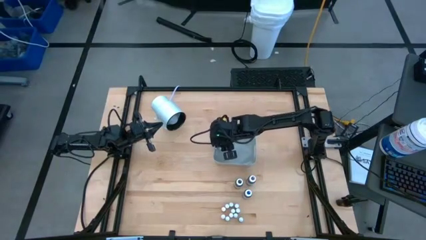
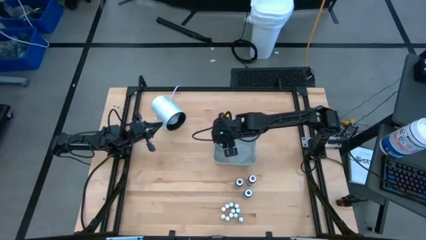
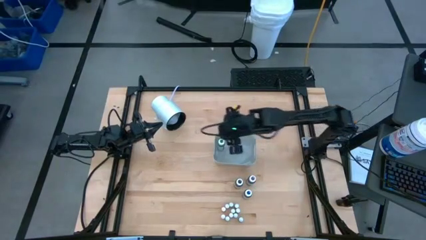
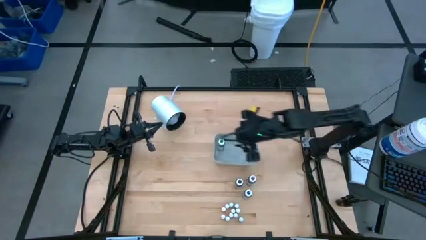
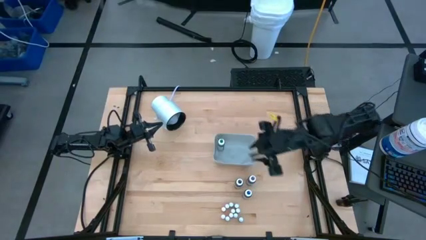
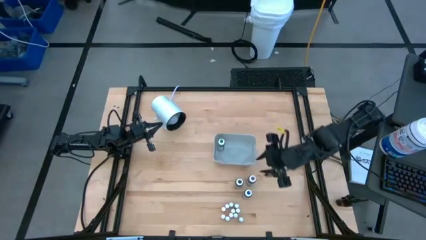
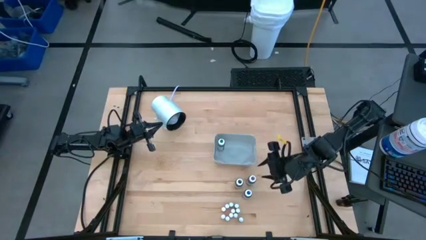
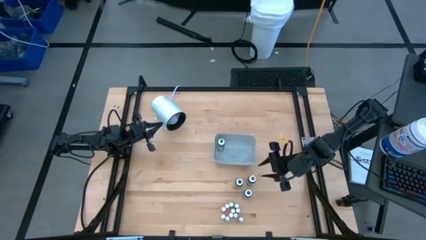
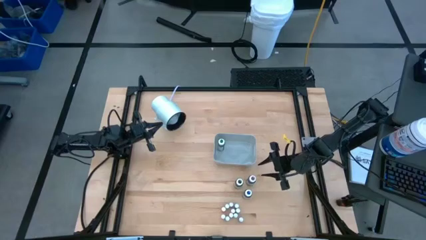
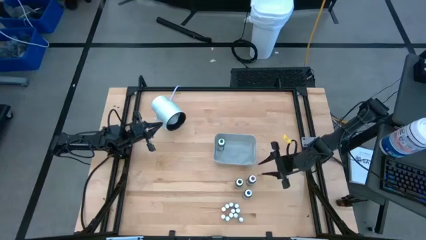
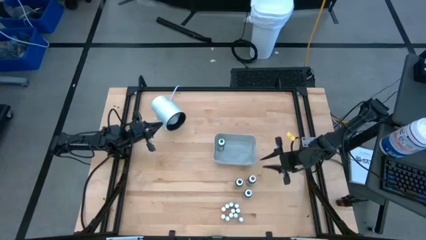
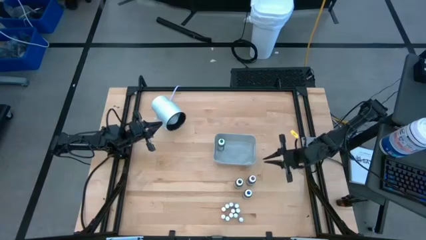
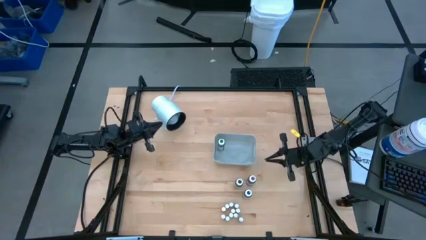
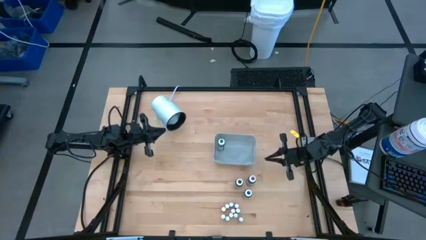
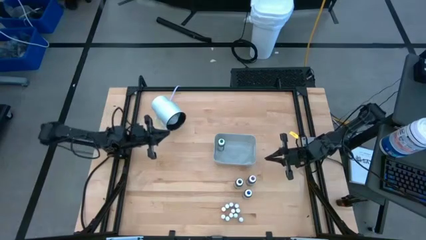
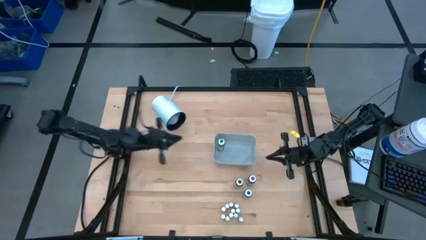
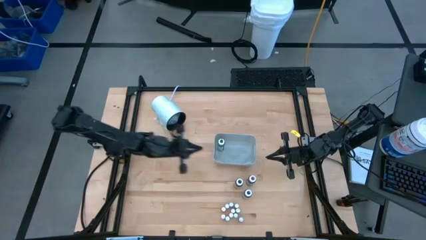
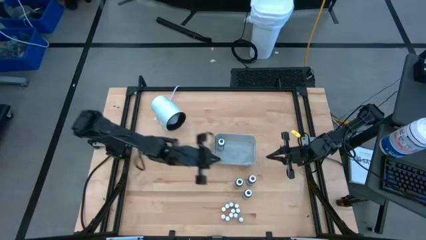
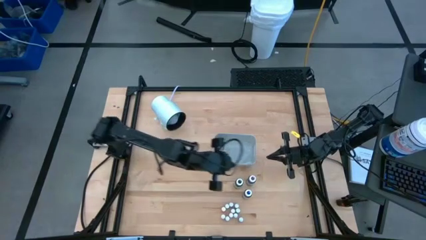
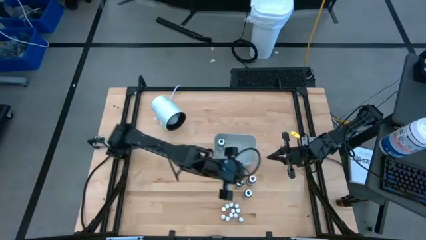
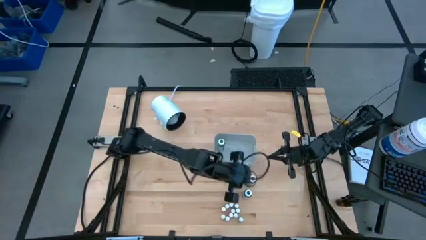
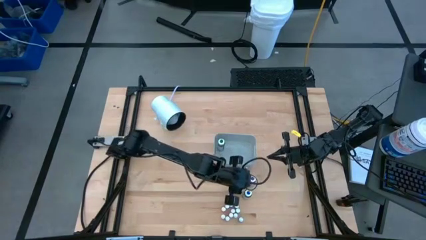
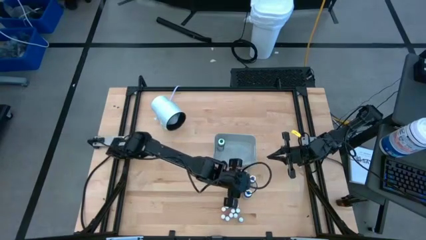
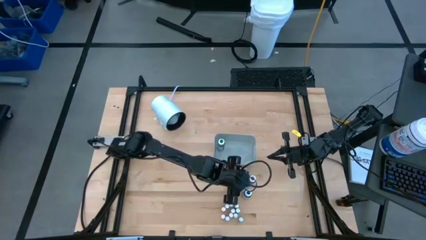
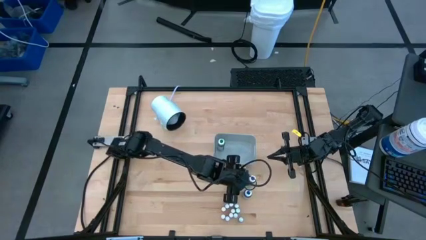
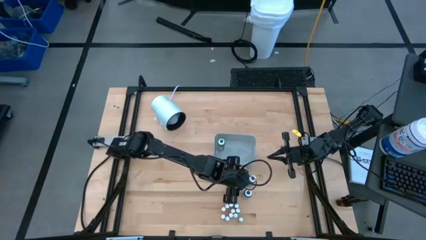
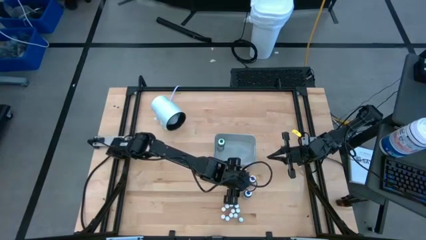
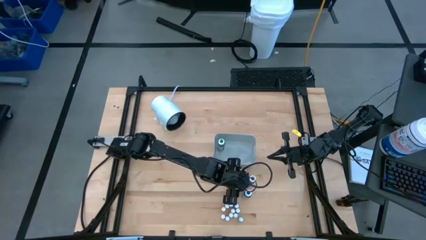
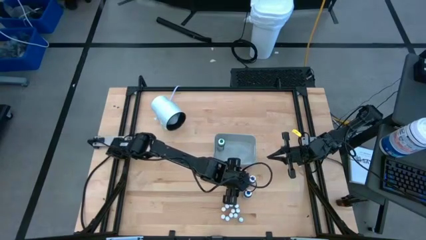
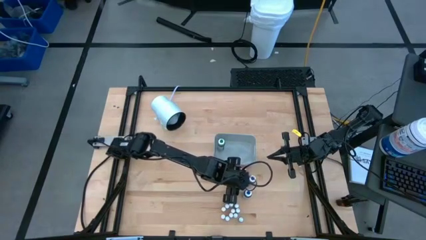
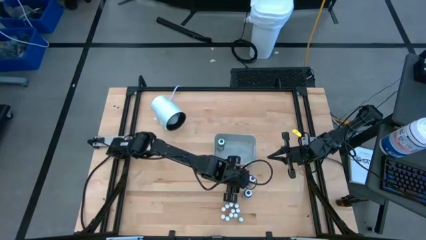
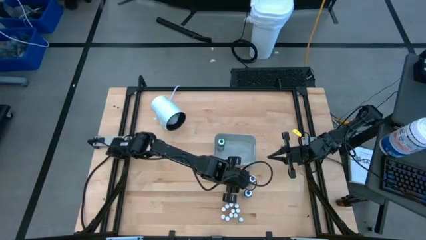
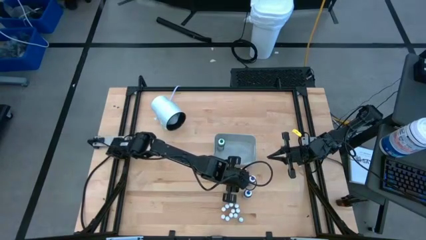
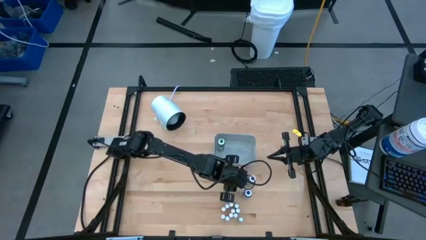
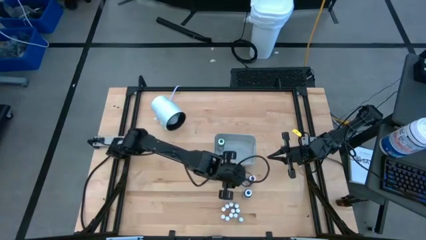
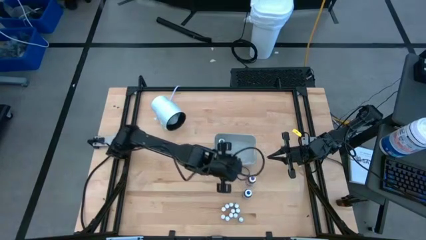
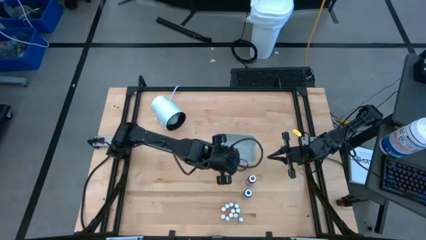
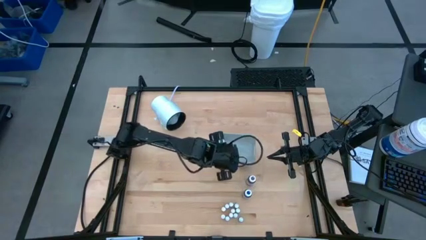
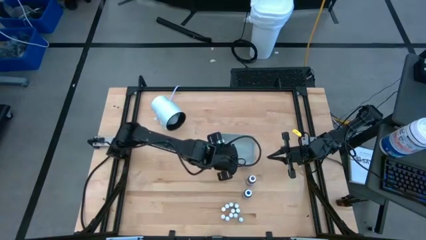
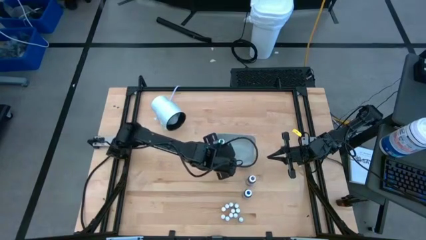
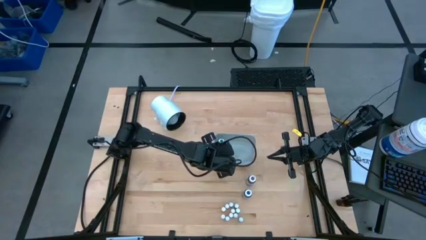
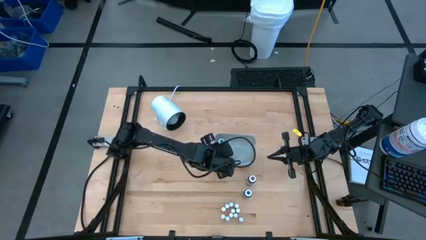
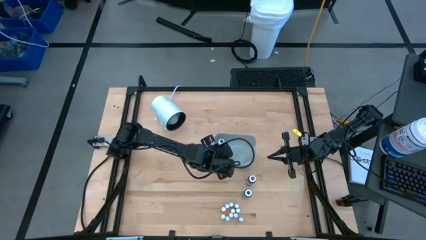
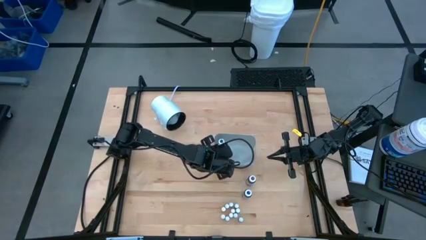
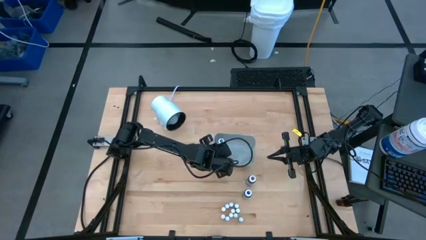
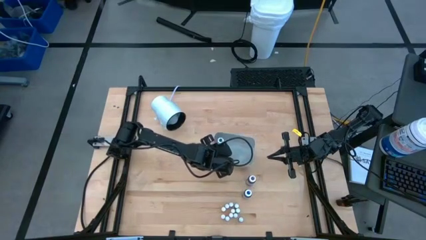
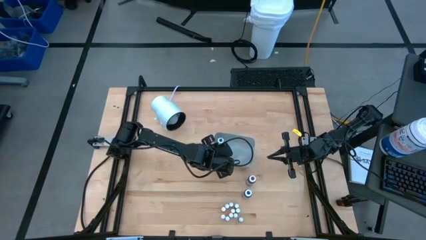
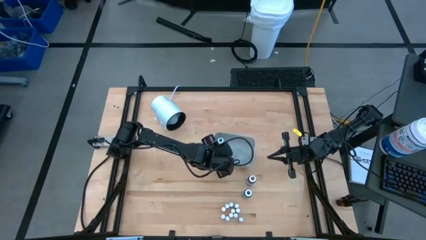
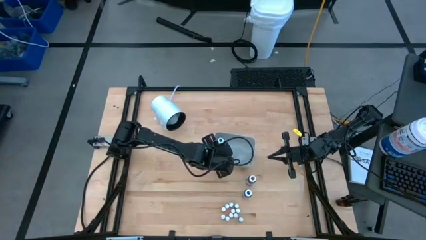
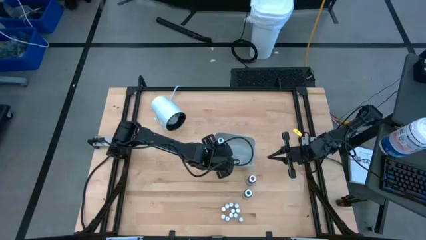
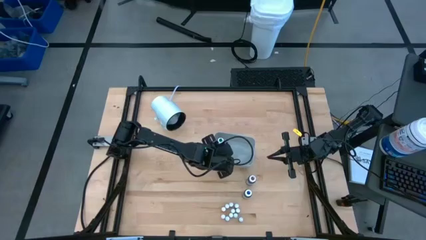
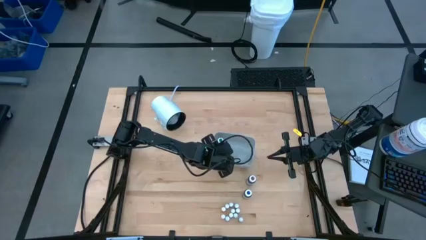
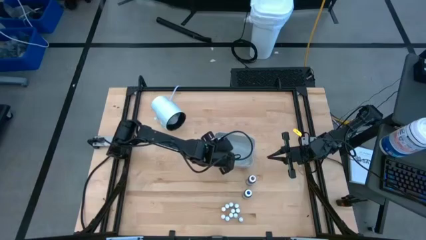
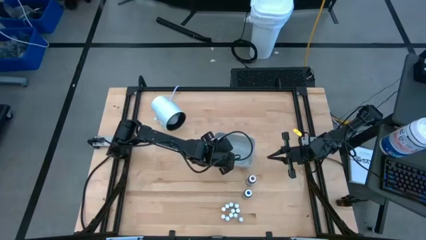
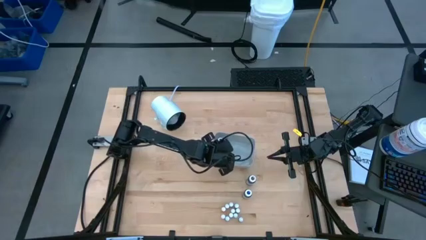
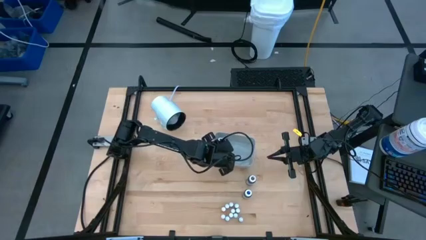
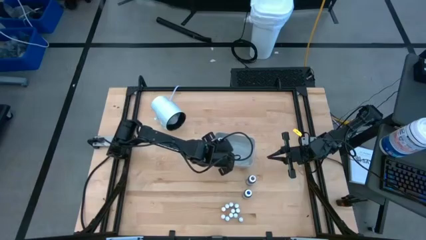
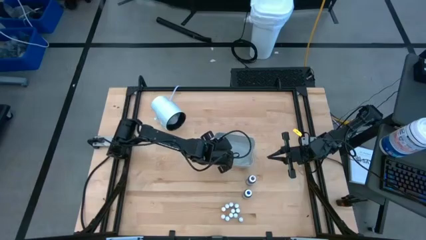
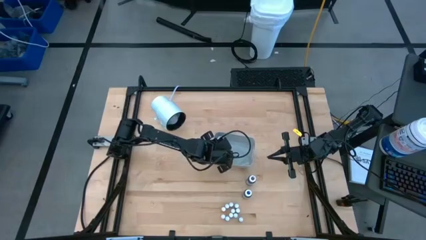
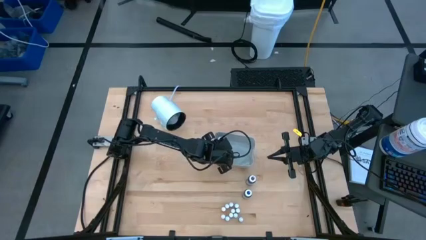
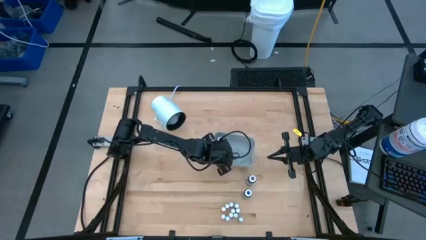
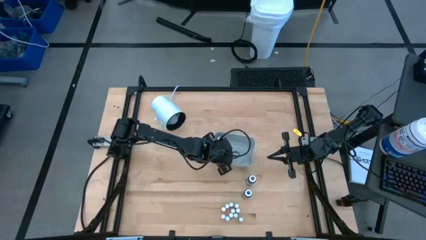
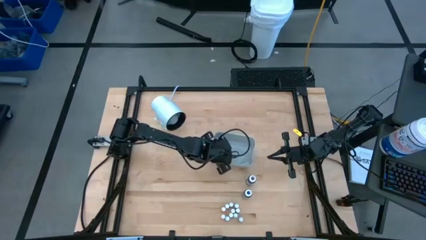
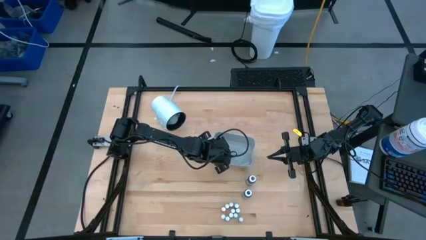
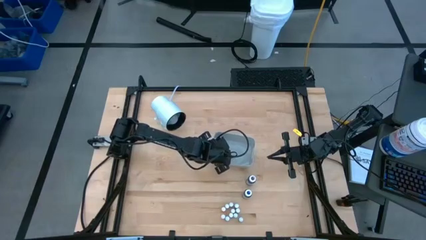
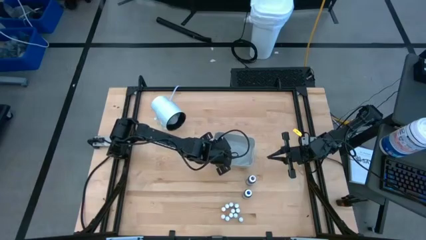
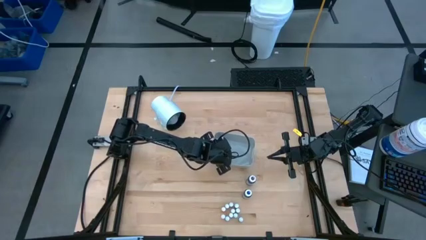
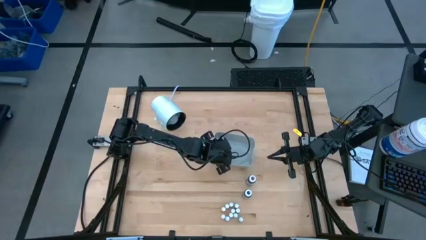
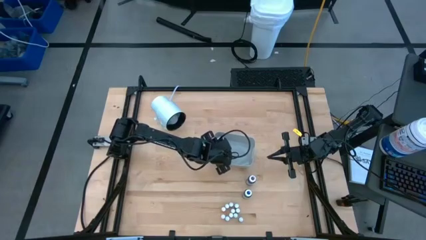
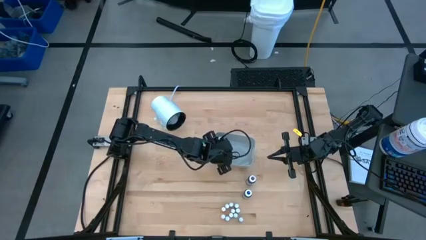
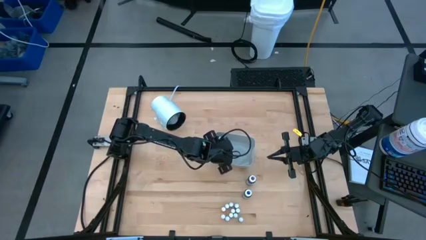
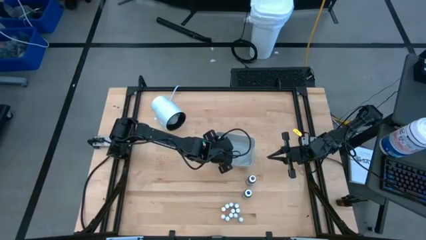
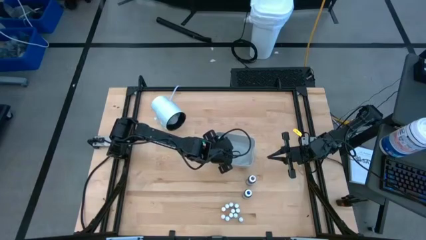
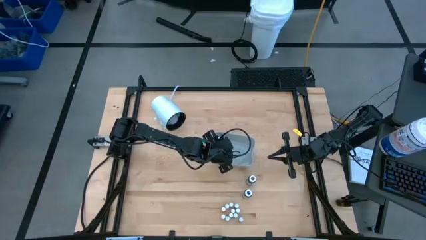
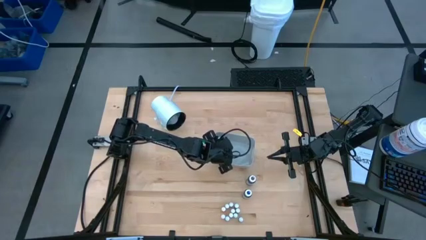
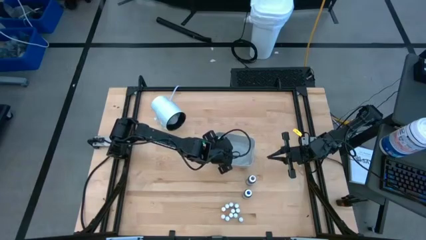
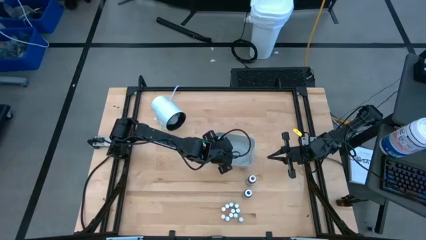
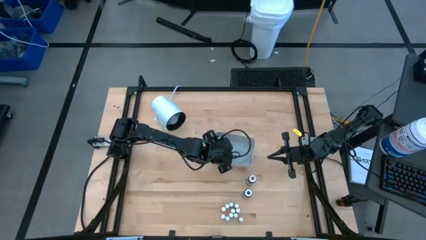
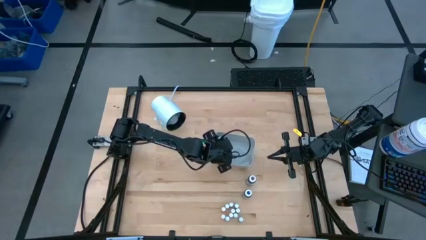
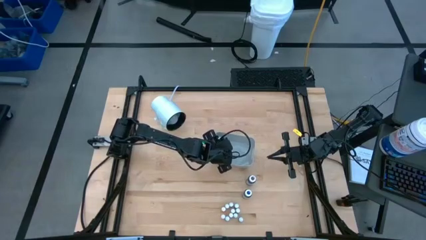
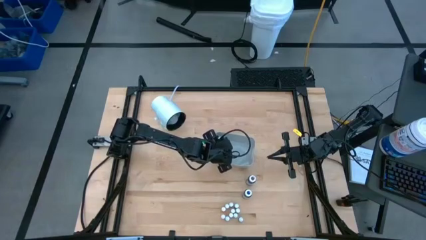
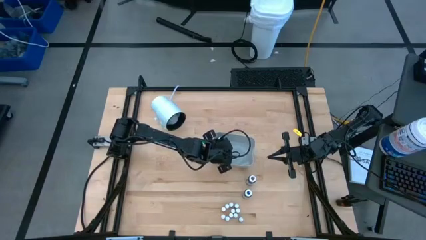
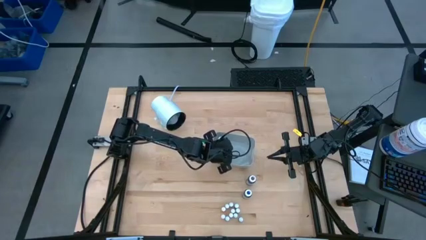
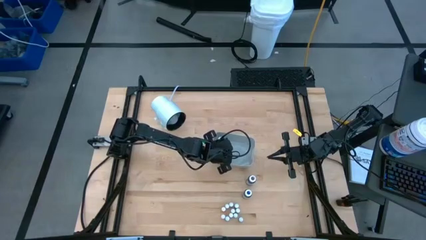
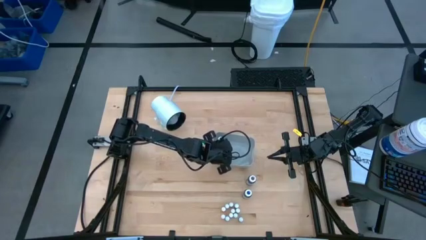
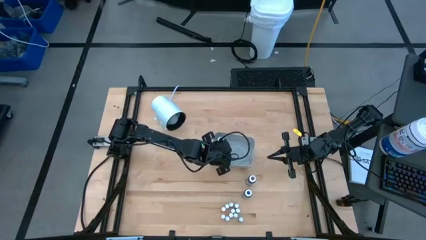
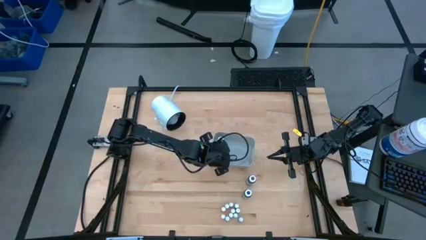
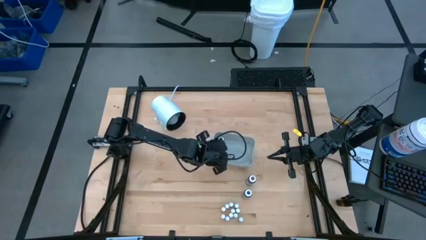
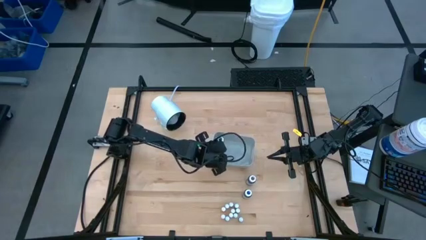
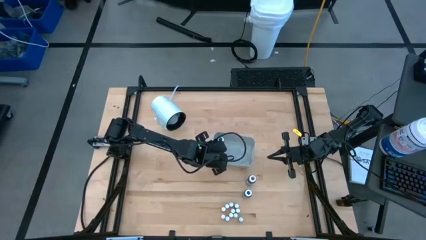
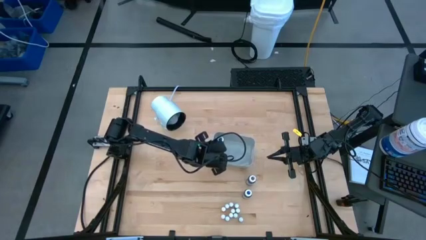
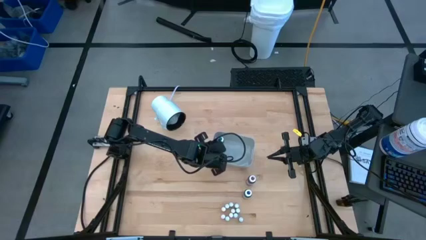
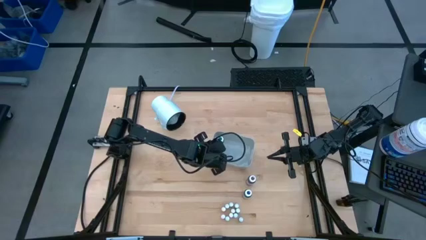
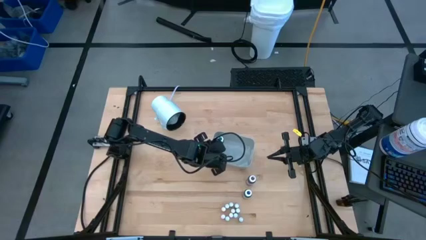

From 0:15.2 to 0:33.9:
Task: Pick & Place food coloring
Put the big black food coloring bottle into the gray bin
